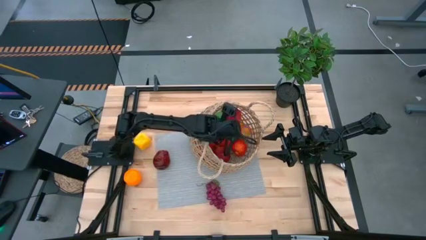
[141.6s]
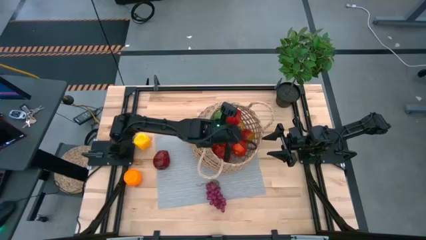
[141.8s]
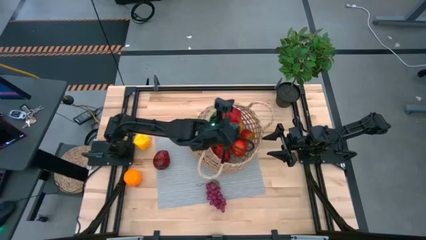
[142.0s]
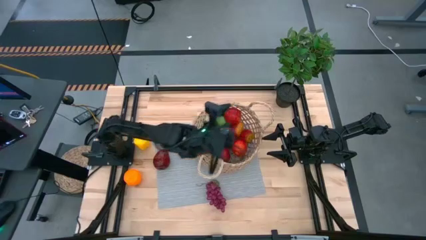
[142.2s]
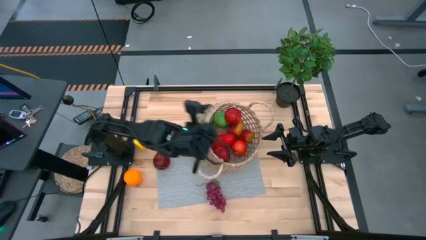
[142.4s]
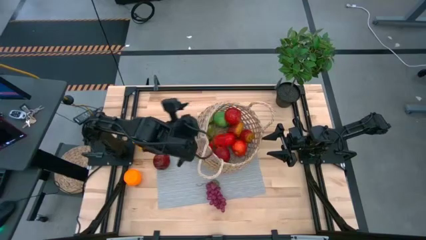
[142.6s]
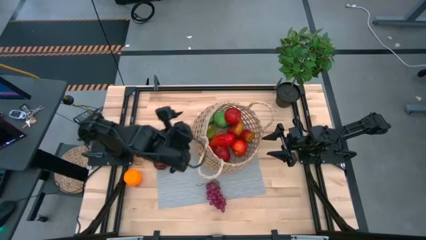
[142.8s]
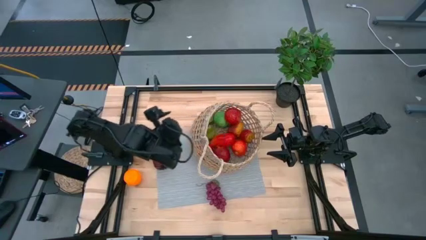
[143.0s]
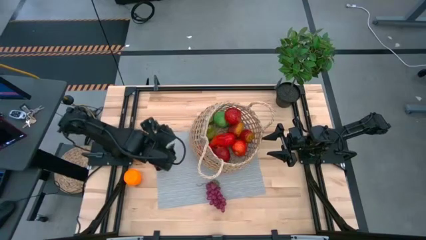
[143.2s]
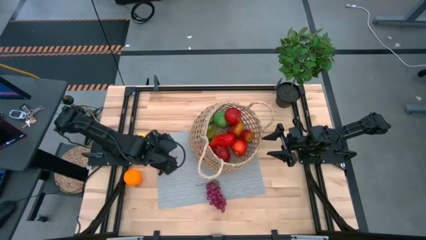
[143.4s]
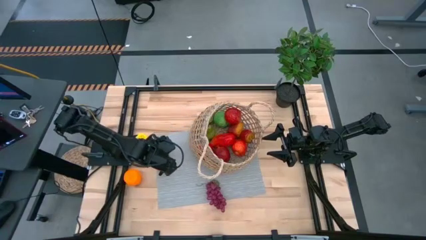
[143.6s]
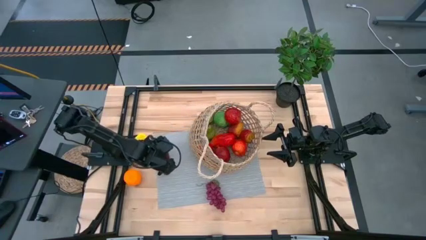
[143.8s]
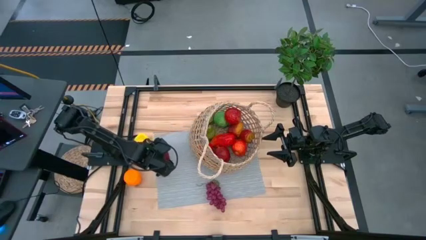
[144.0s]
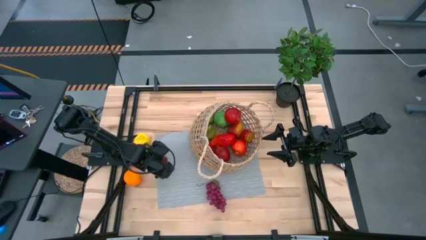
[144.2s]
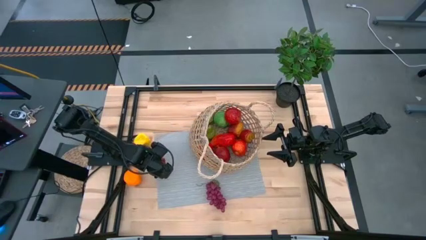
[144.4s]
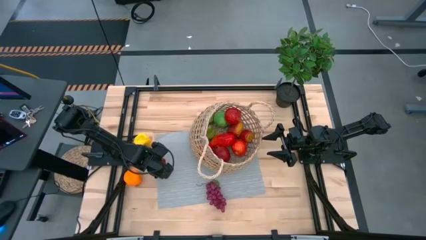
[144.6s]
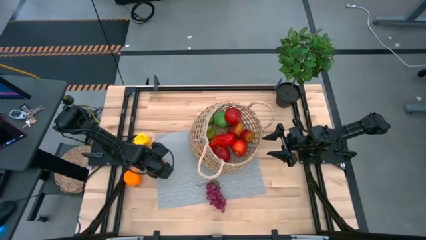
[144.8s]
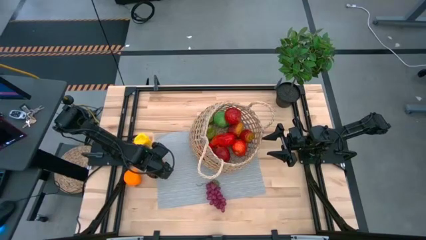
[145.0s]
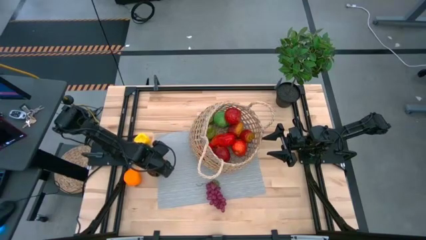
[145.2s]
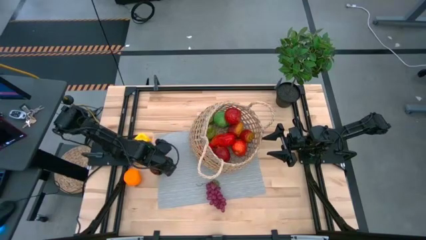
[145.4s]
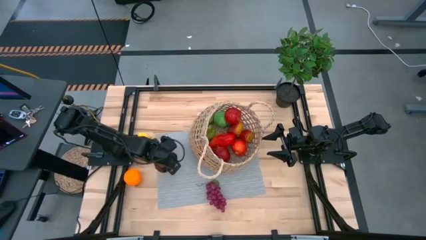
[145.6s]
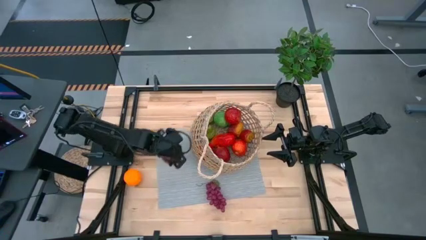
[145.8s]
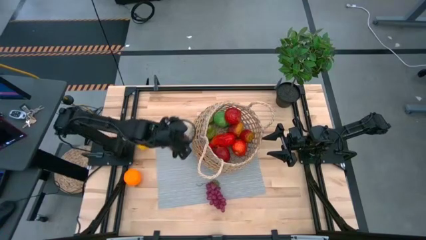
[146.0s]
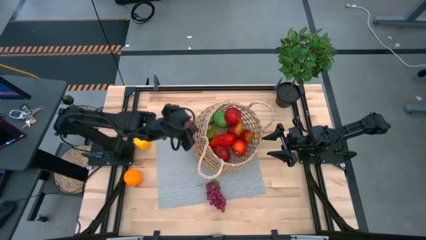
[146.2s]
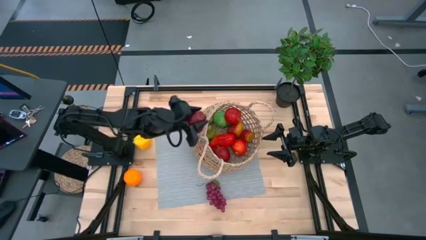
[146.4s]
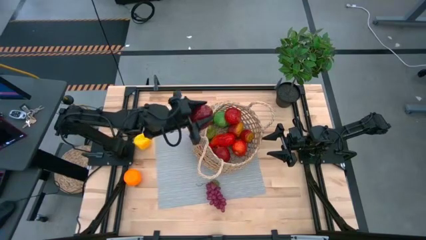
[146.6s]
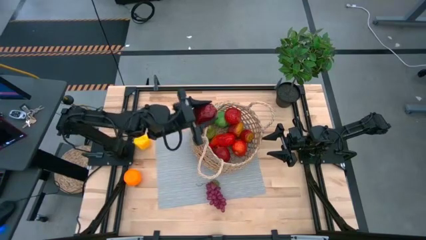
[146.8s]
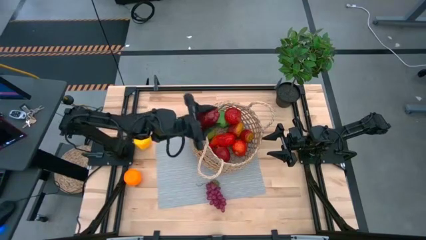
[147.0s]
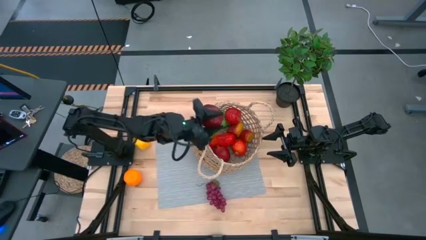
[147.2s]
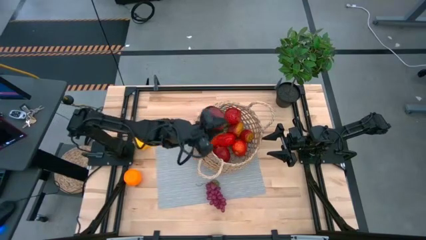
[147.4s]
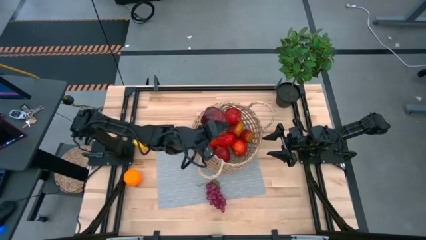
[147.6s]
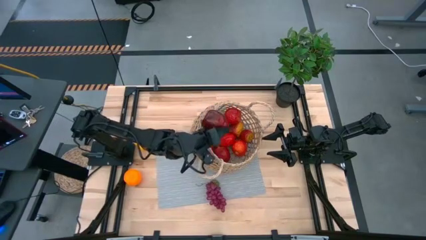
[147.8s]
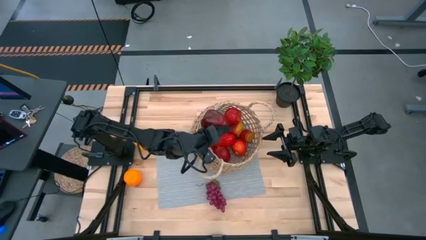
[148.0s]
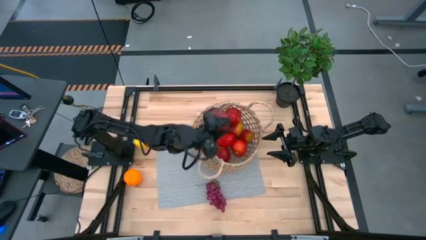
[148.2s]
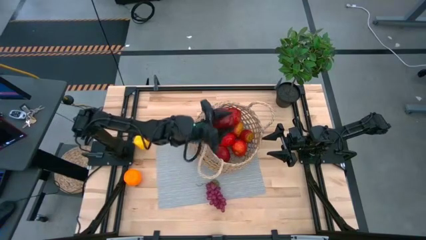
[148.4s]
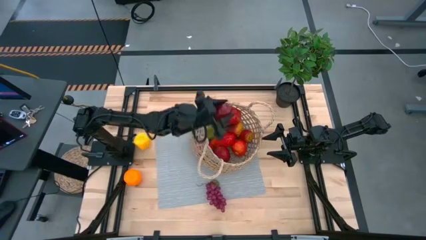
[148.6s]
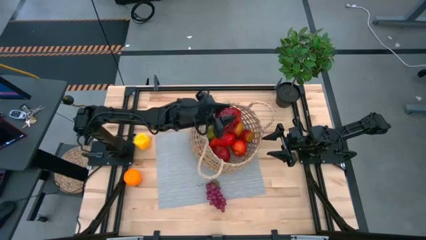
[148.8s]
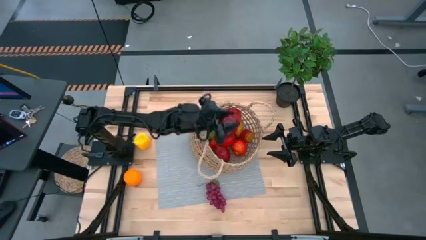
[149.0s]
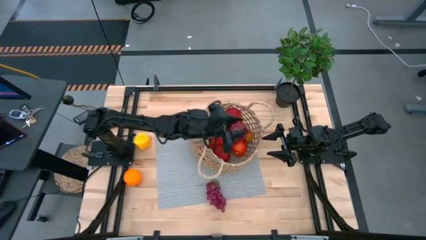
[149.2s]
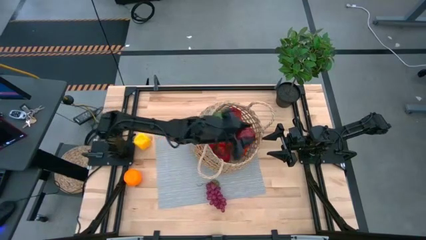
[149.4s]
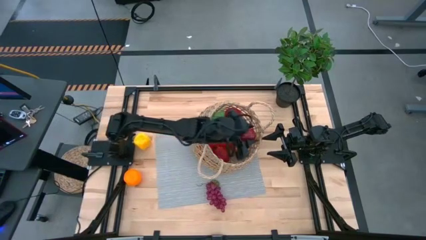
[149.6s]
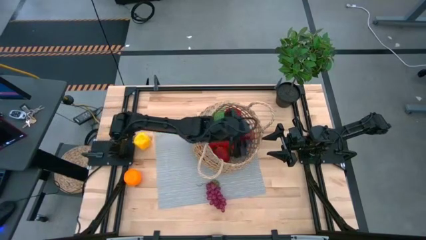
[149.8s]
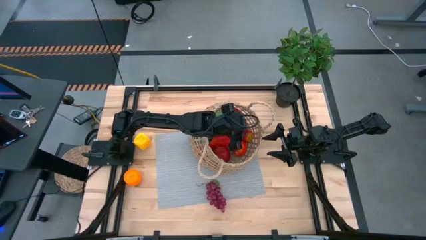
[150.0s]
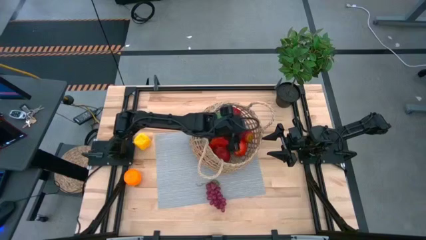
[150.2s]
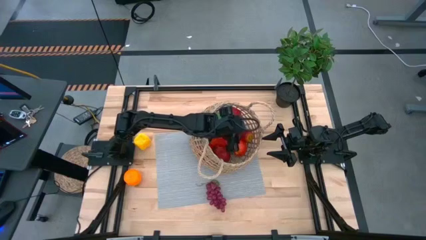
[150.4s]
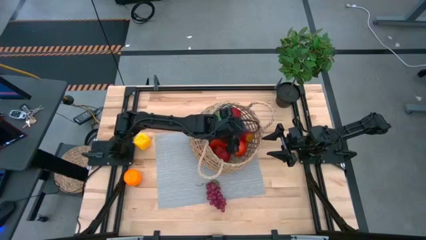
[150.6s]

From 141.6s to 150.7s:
Task: Build produce basket
Put the dark red apple into the brown basket

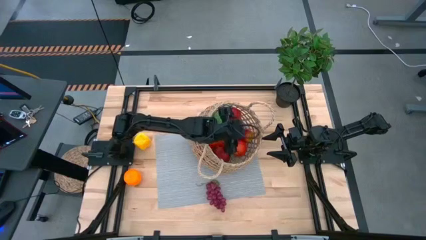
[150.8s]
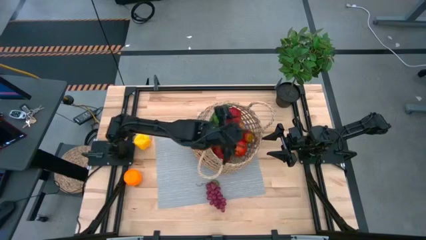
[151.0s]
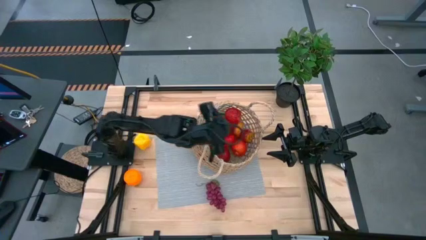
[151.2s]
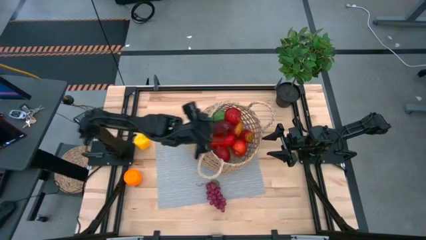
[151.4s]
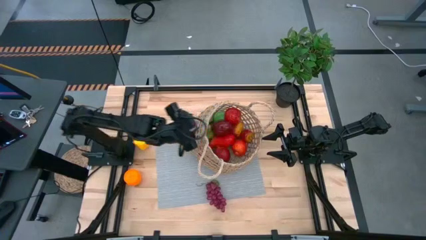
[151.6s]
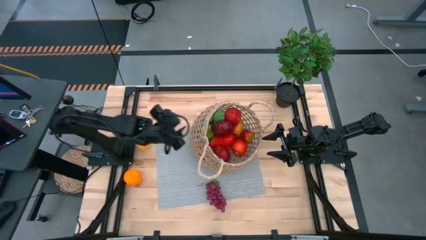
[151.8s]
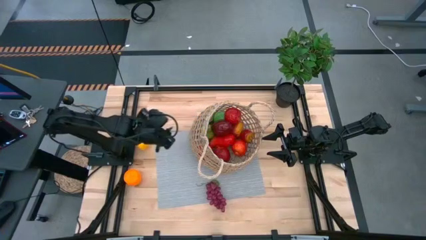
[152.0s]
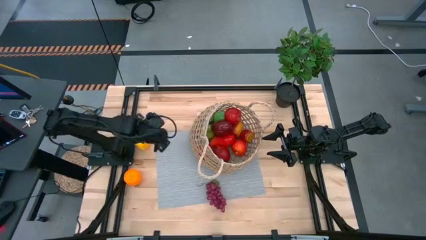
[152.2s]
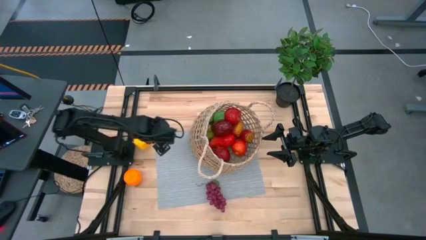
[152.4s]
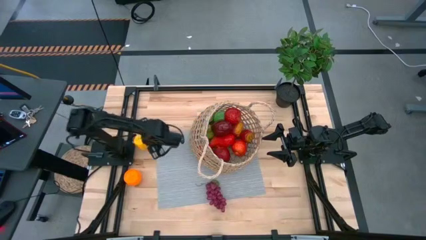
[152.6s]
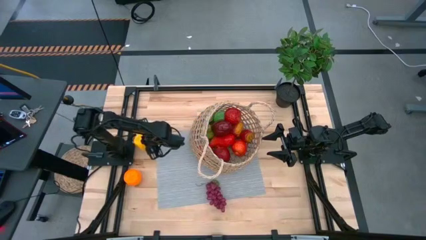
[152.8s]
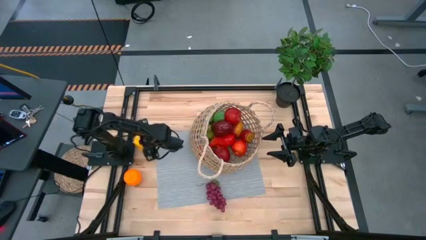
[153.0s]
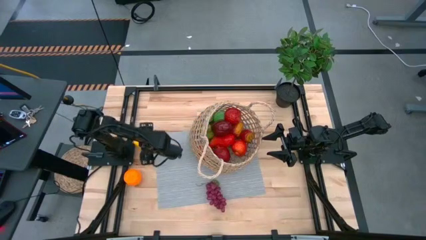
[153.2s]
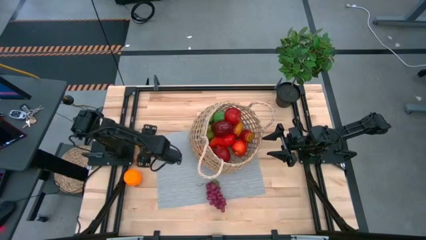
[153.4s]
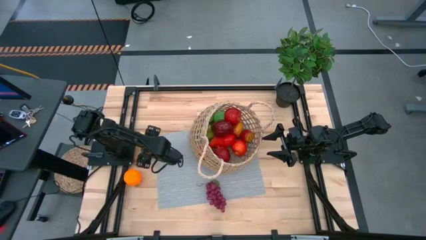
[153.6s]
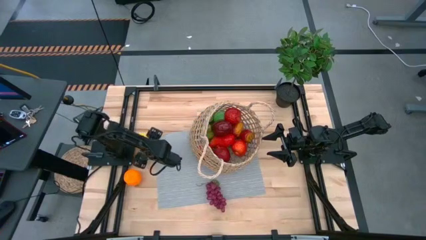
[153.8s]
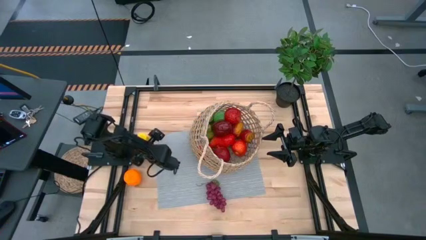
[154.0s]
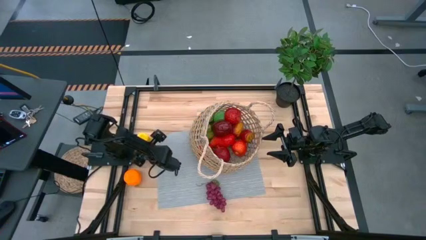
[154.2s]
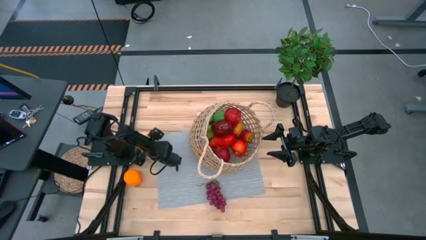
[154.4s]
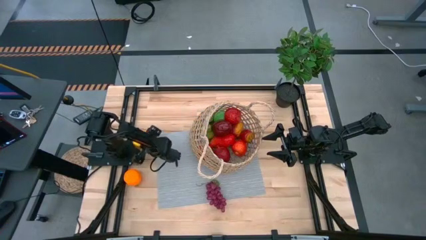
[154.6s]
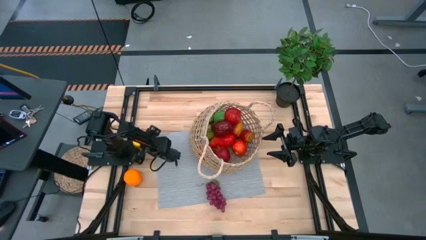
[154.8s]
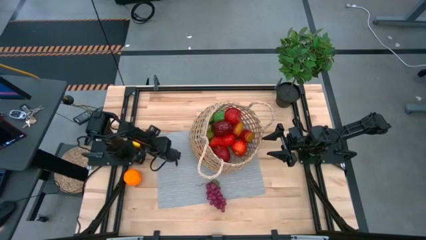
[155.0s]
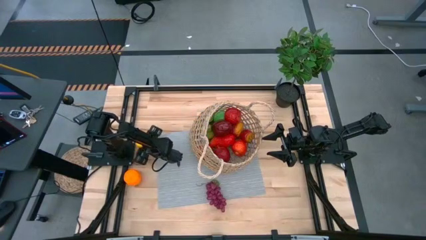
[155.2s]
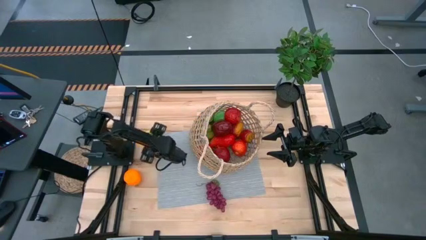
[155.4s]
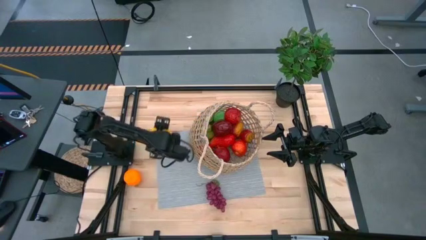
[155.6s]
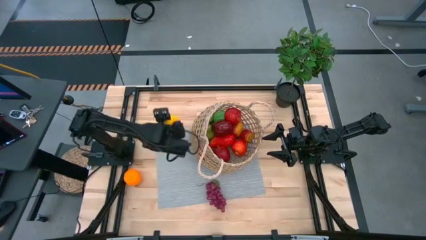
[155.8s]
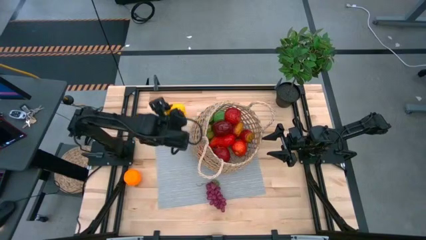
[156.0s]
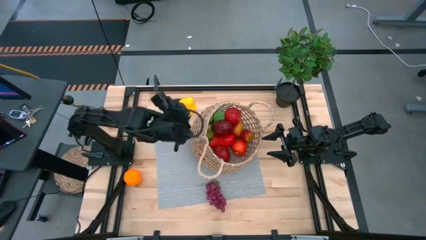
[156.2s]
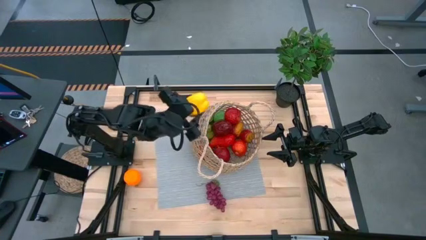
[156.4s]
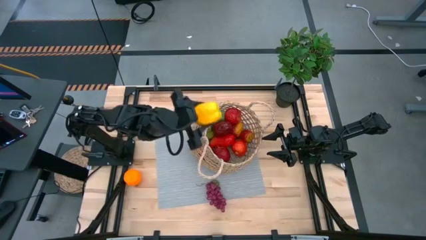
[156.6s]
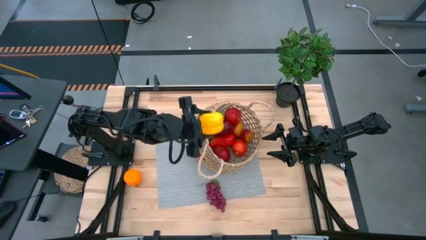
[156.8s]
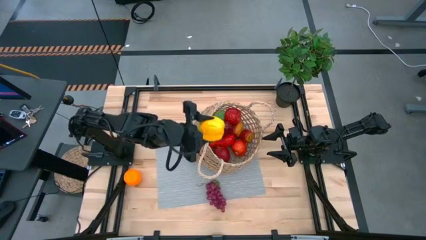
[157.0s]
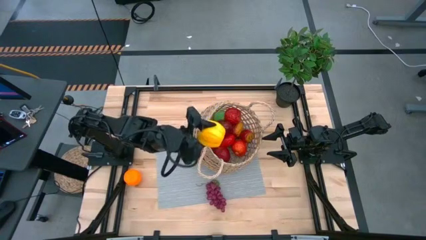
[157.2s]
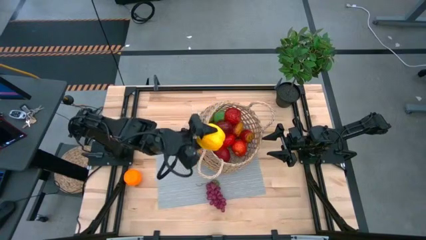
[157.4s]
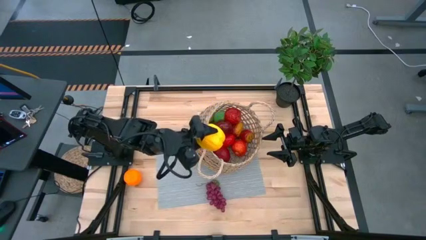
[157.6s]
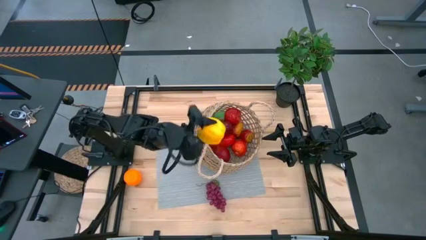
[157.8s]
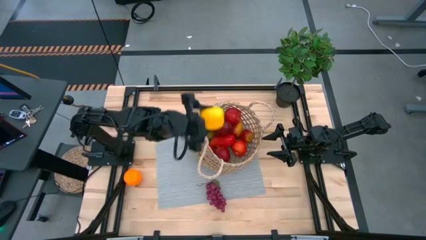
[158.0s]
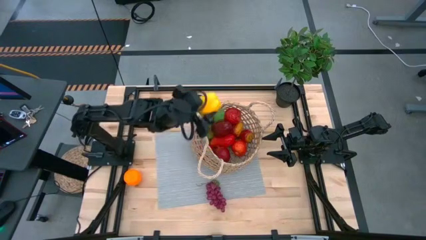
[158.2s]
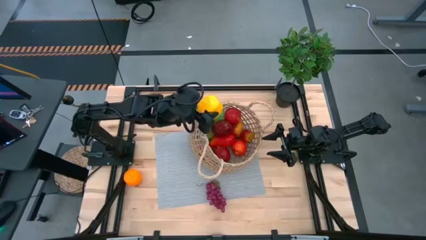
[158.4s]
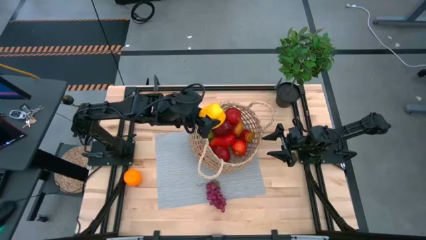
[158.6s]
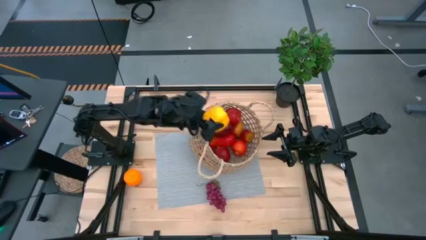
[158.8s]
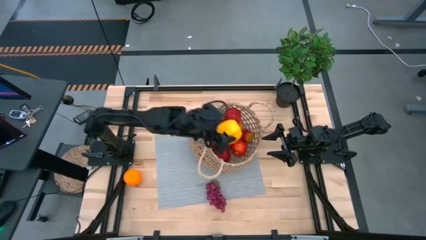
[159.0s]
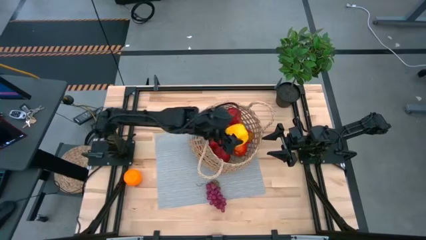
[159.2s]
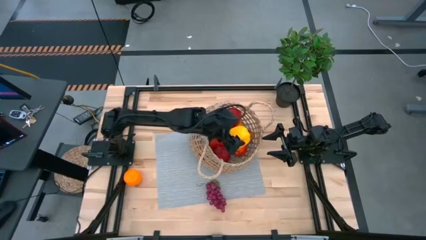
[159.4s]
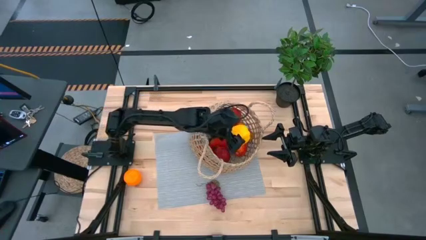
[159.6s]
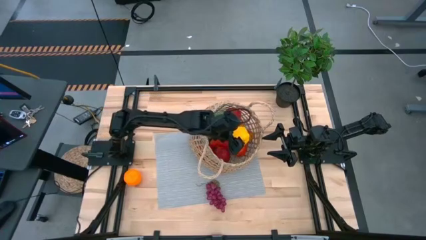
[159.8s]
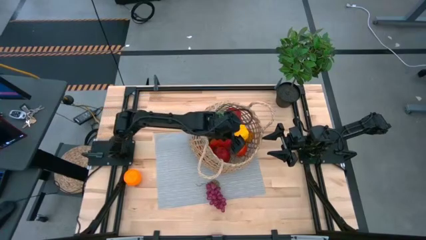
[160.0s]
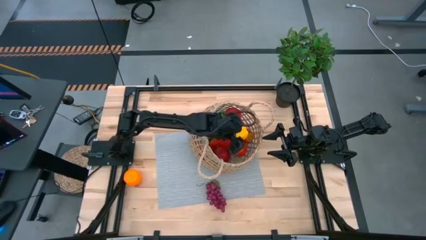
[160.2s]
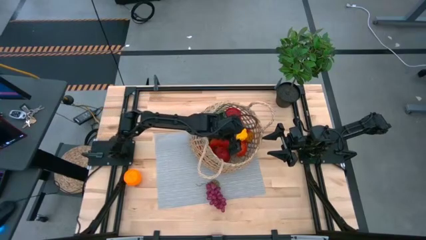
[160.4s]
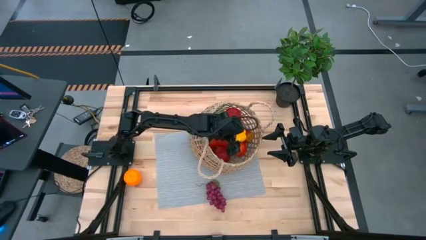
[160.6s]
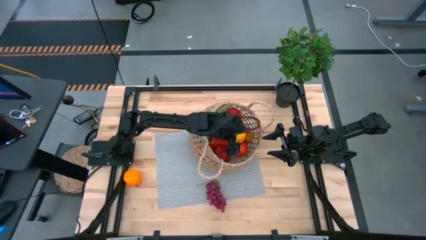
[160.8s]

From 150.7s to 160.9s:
Put the yellow bell pepper into the brown basket
